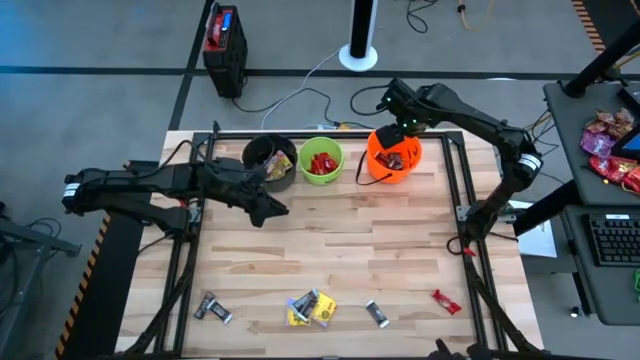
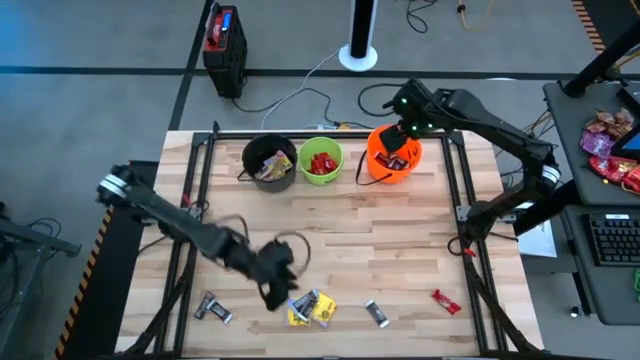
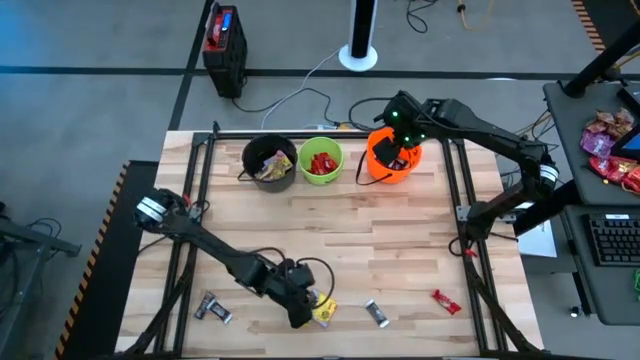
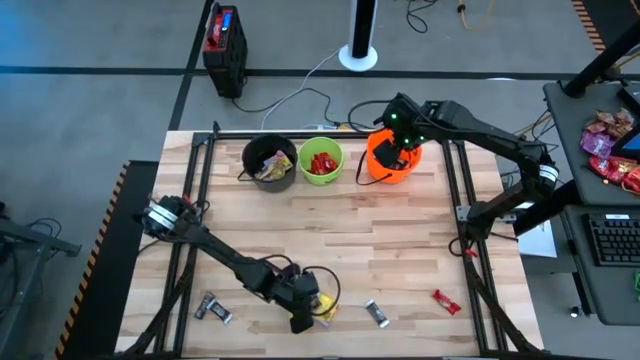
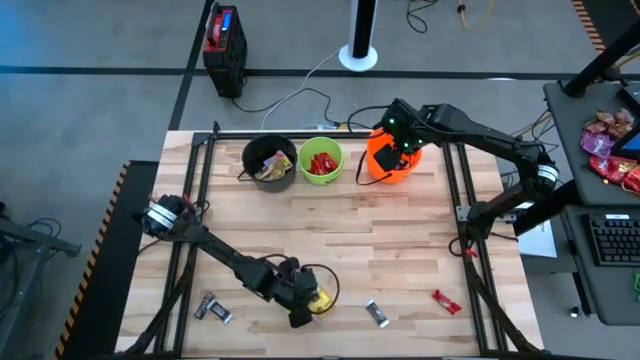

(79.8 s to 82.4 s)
Task: Sort candy by brand, put in halloween buckets
Put the brown chocolate bar into the orange bucket

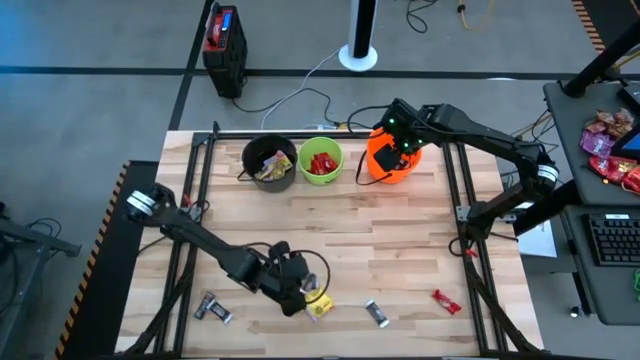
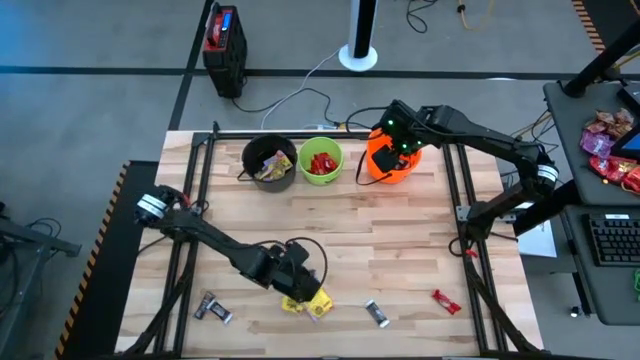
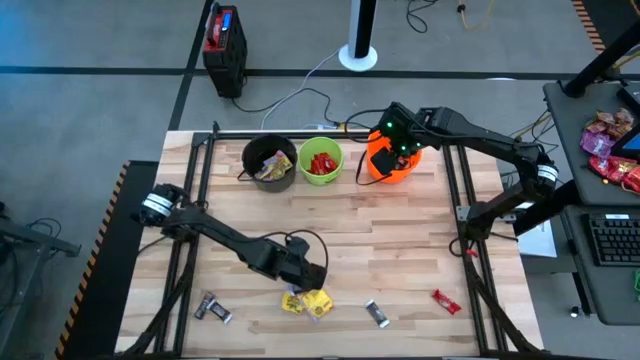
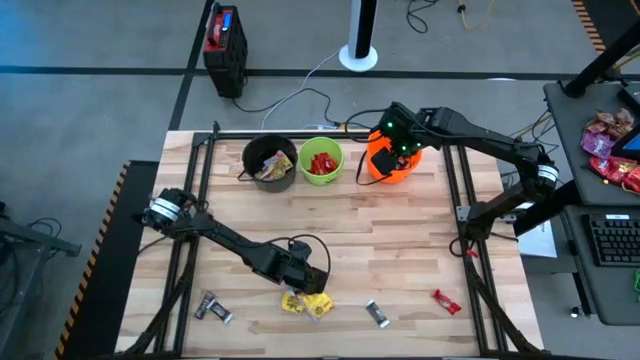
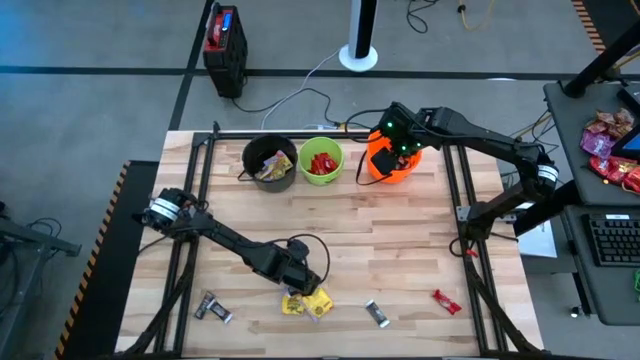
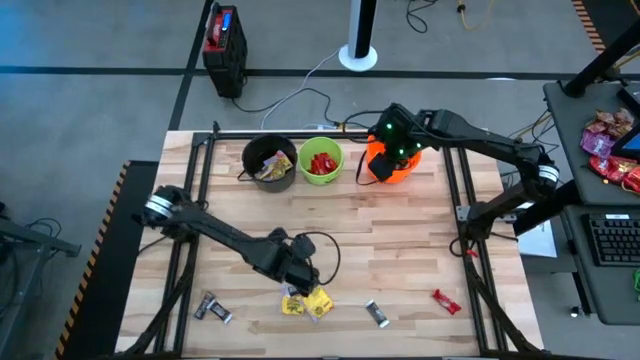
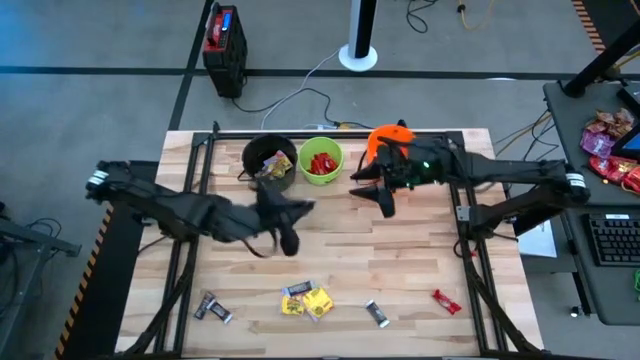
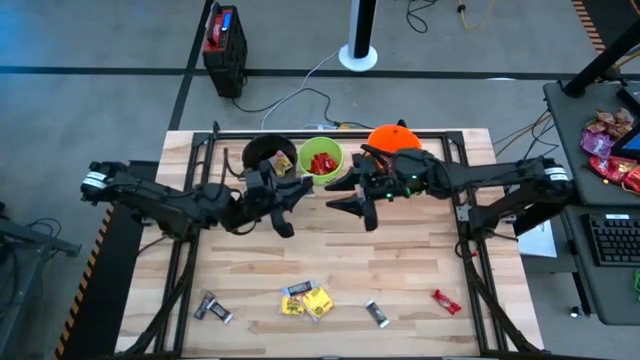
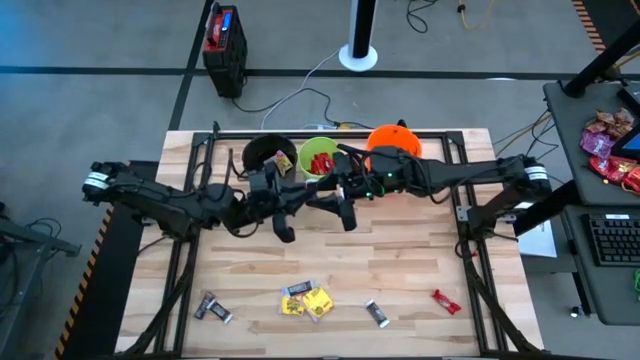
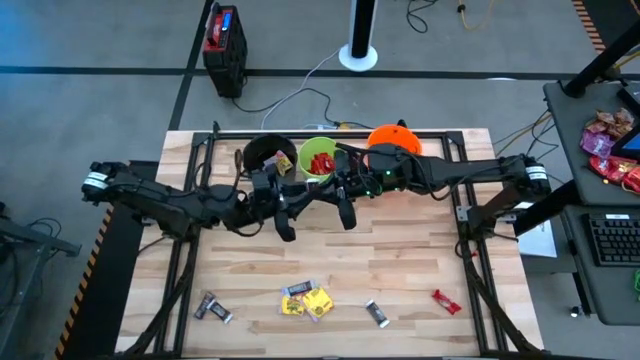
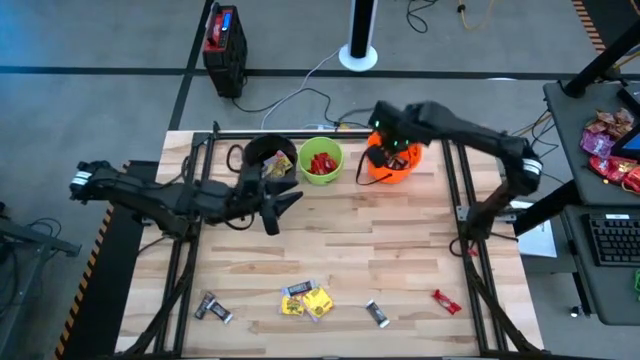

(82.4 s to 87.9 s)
Put the brown chocolate bar into the orange bucket

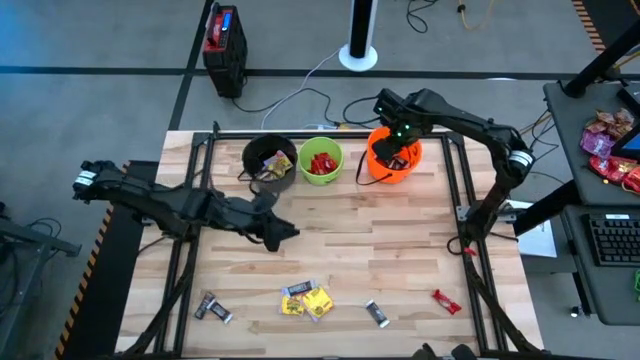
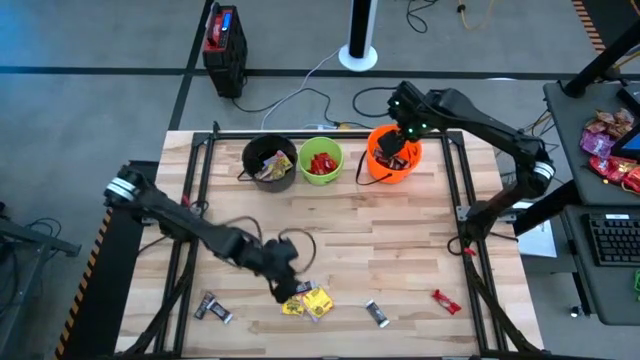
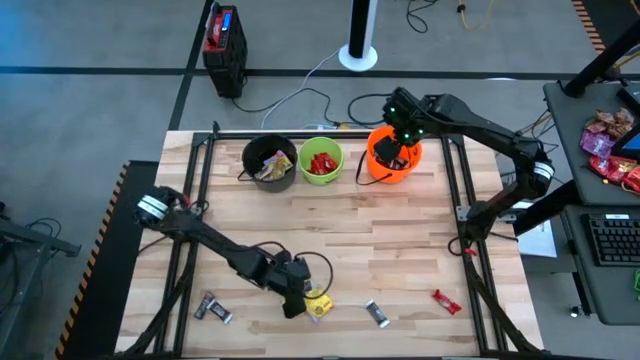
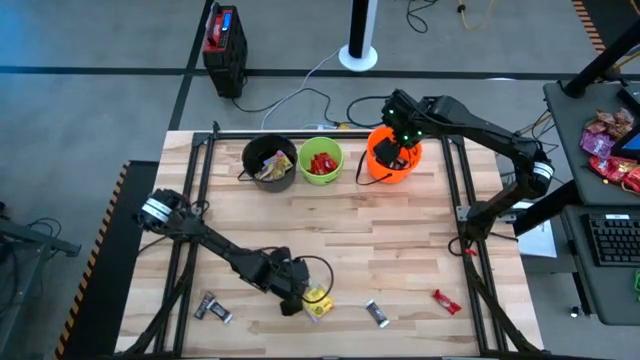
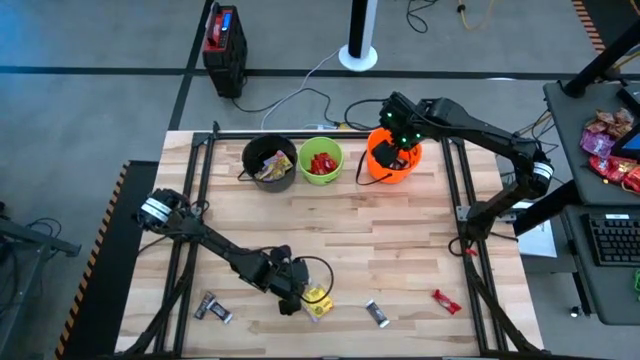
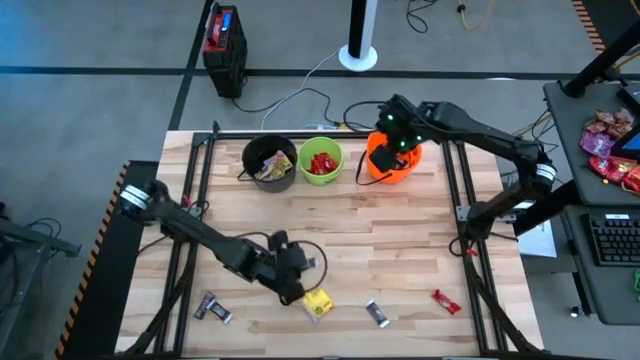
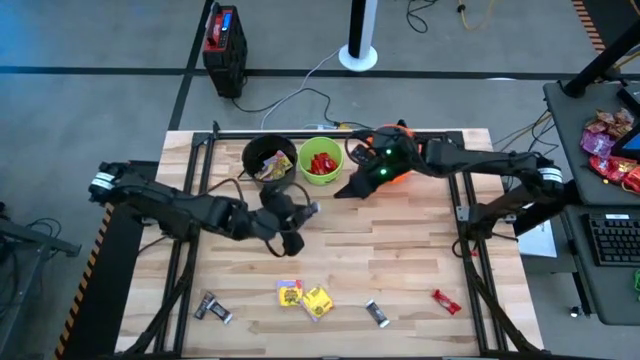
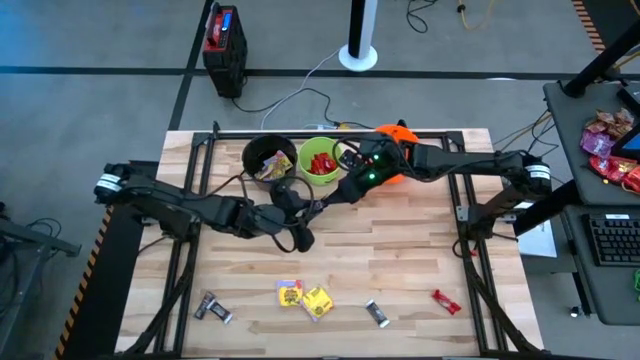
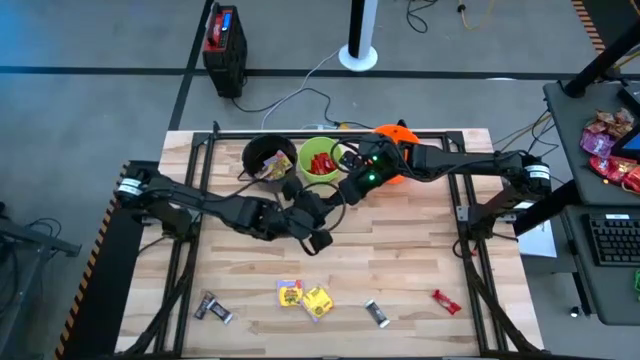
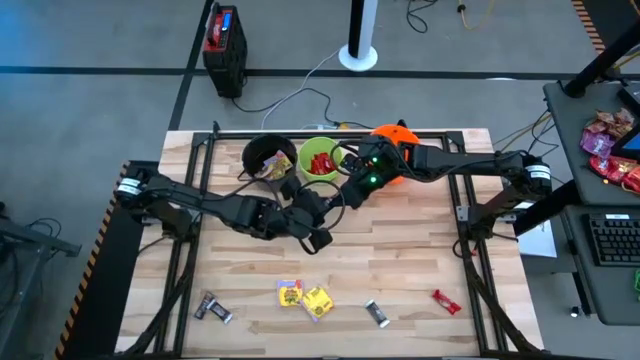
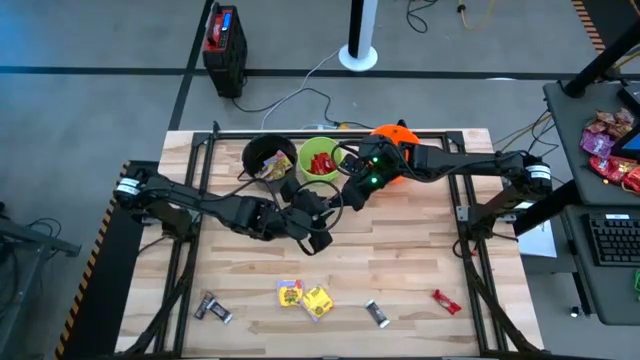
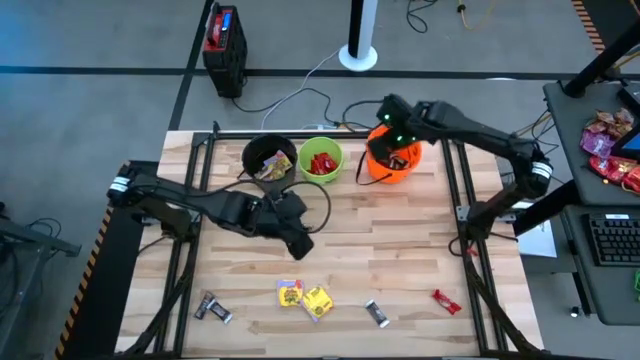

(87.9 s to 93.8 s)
Put the brown chocolate bar into the orange bucket

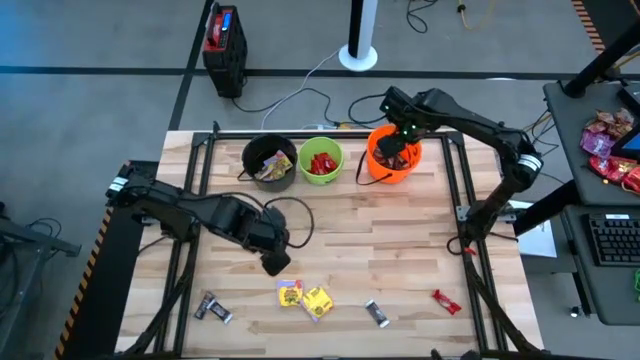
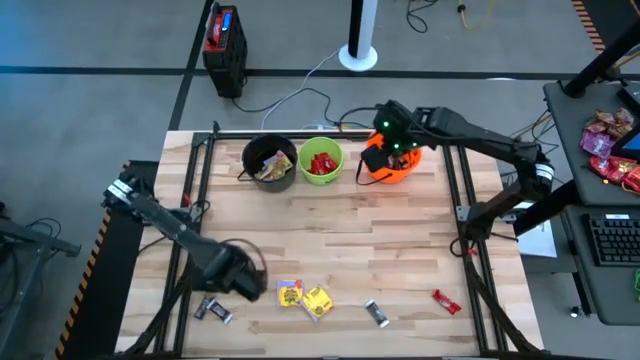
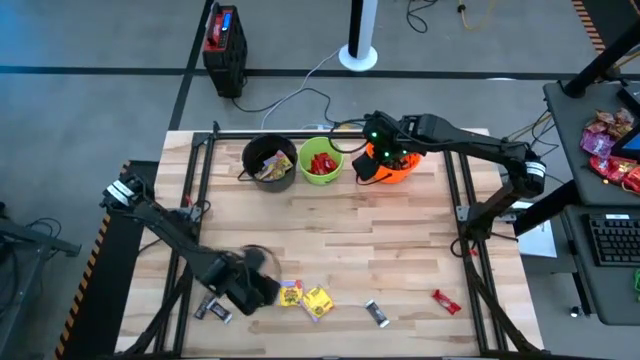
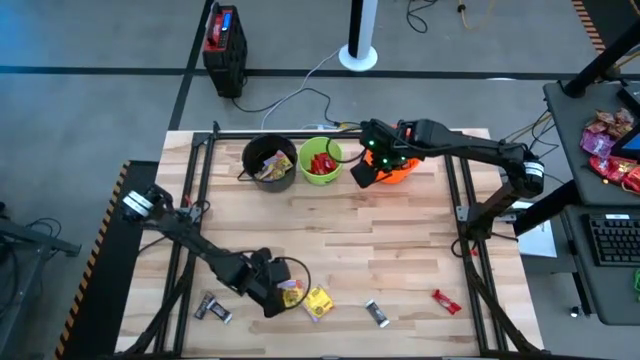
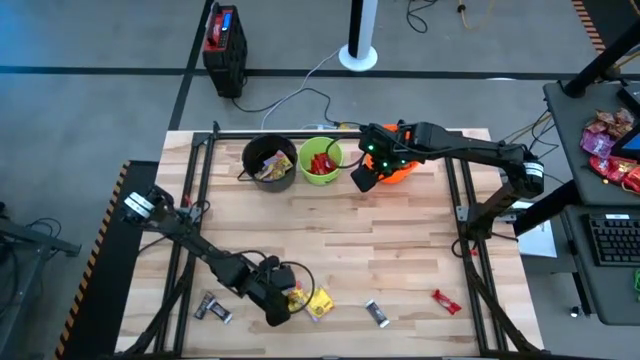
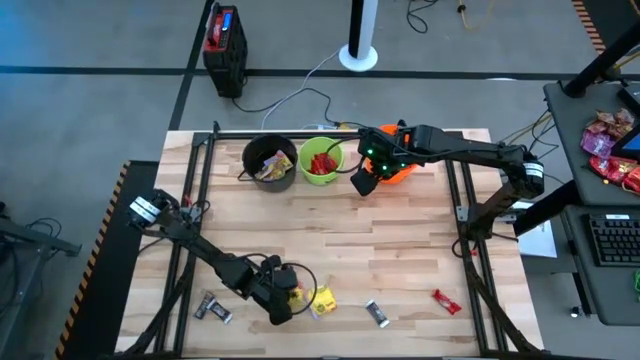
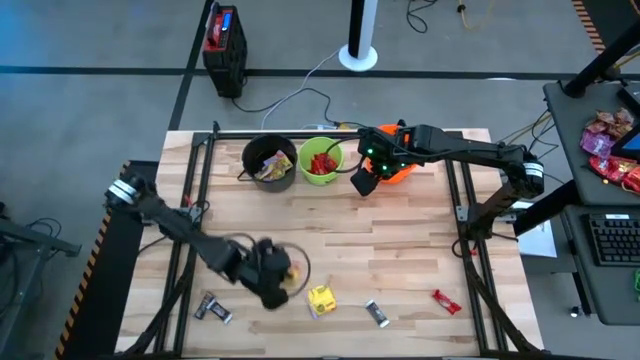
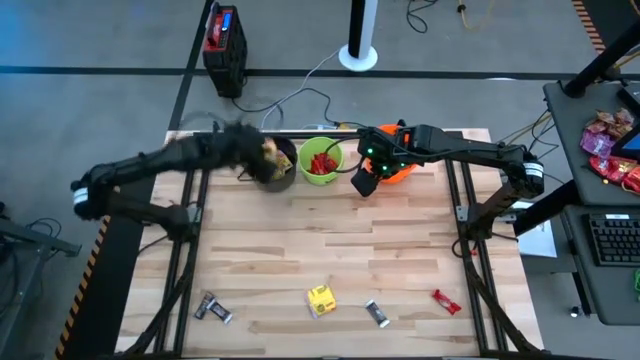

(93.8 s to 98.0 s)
Put the yellow candy into the black bucket

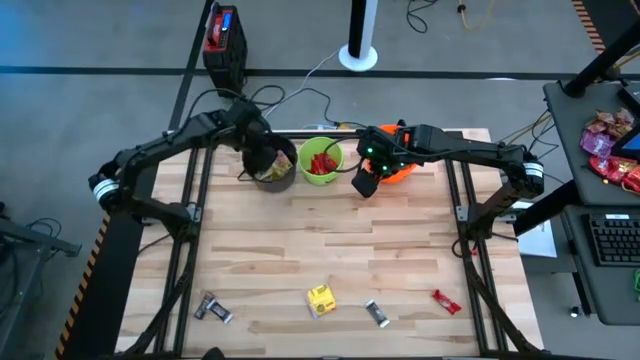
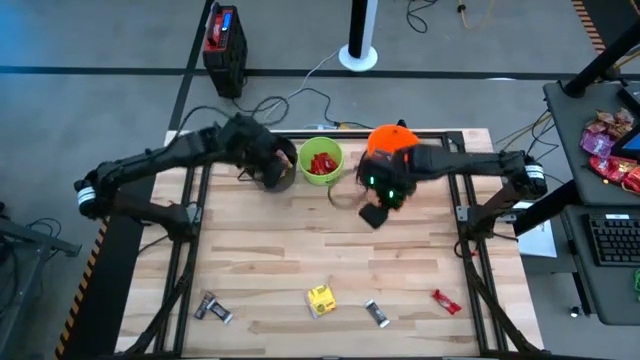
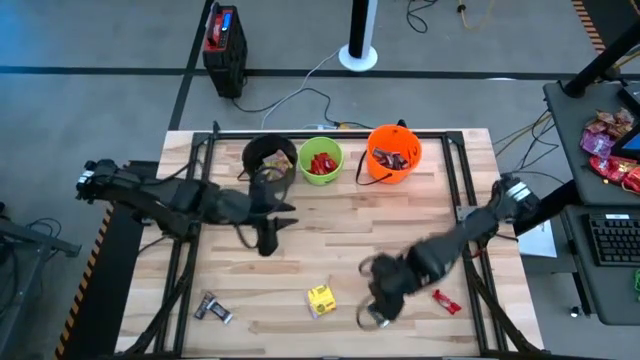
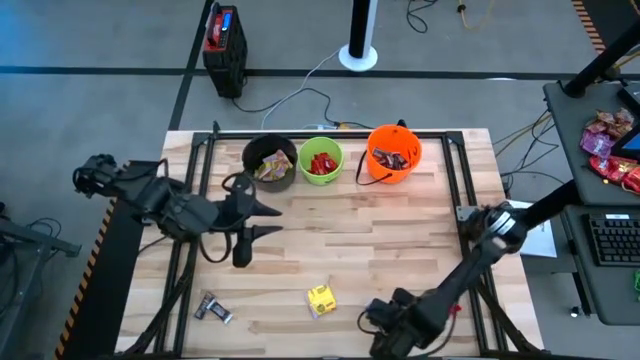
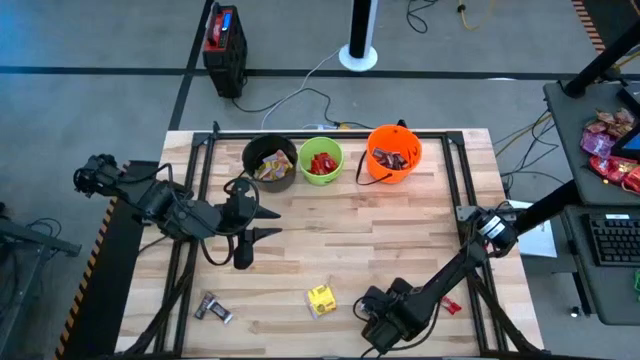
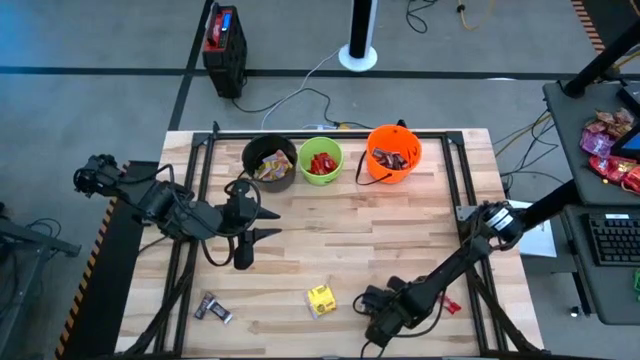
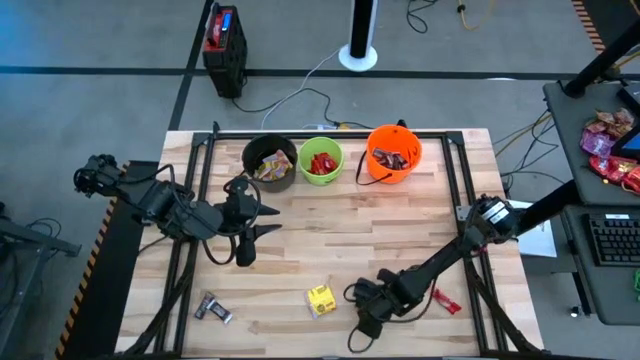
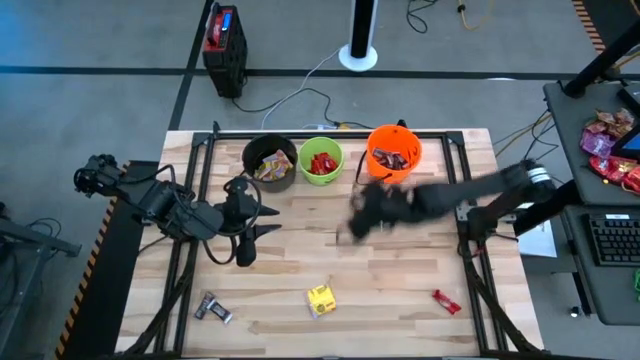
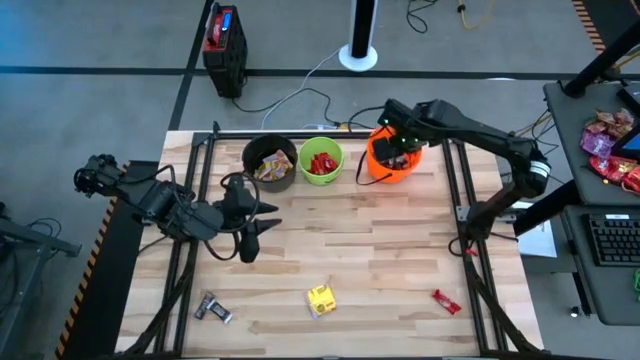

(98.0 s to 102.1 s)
Put the brown chocolate bar into the orange bucket
